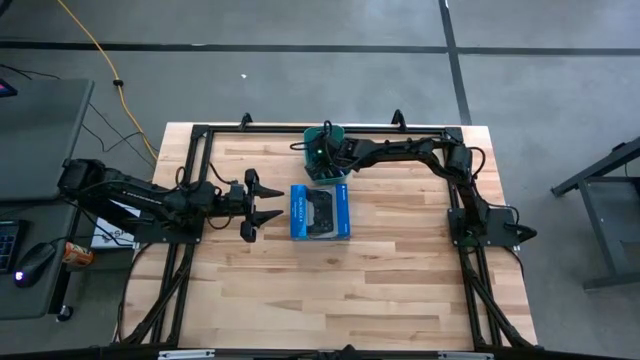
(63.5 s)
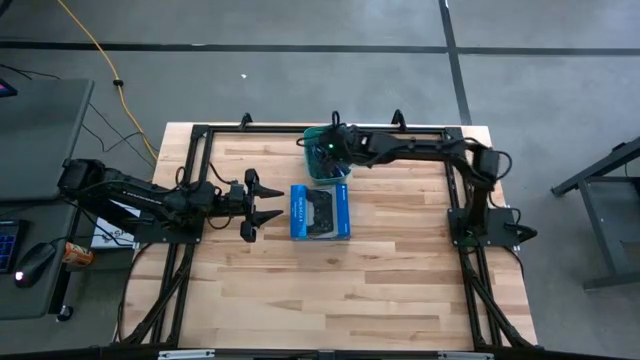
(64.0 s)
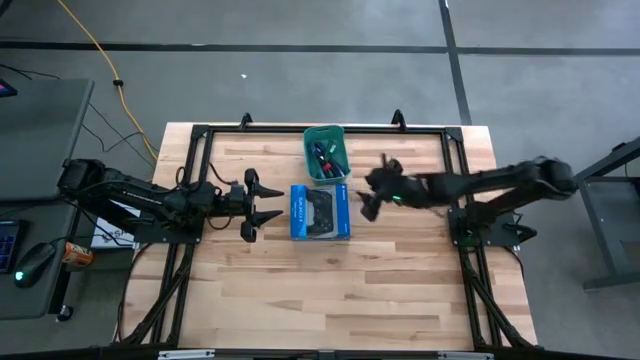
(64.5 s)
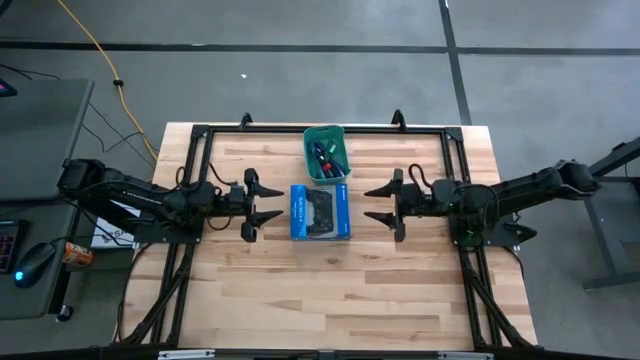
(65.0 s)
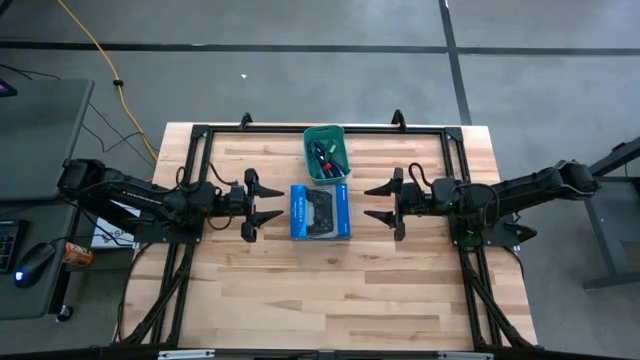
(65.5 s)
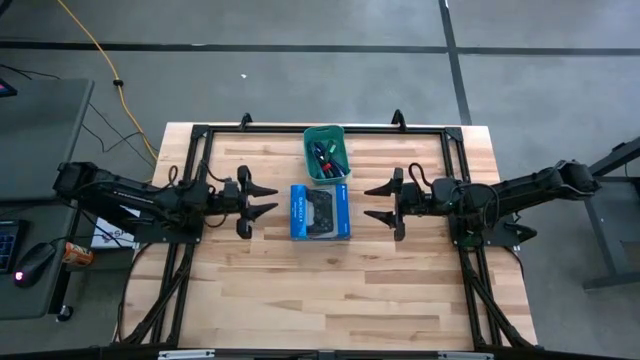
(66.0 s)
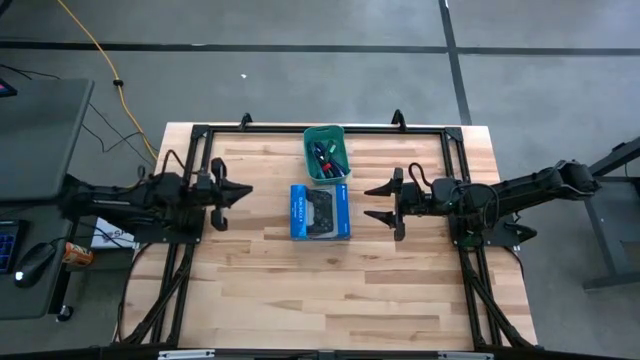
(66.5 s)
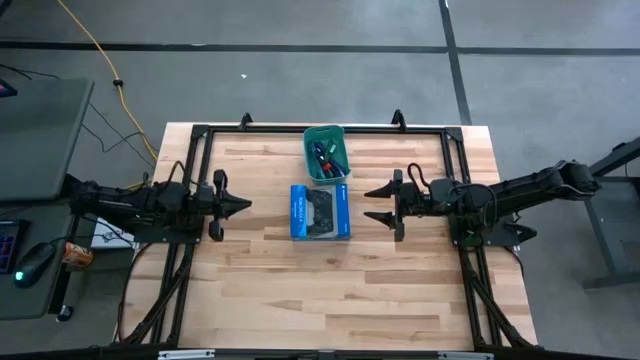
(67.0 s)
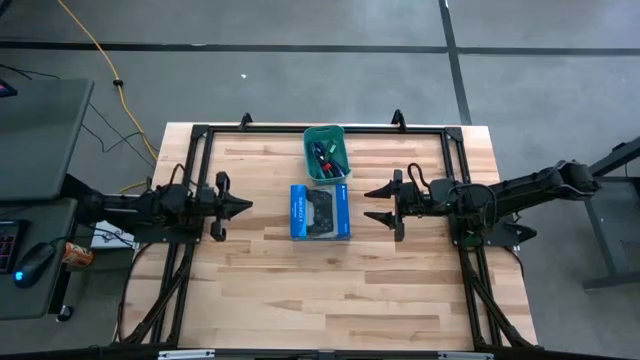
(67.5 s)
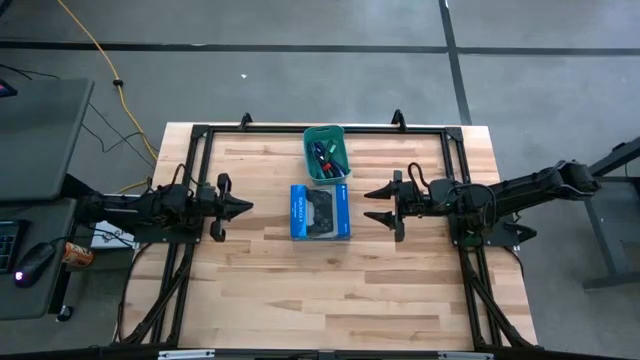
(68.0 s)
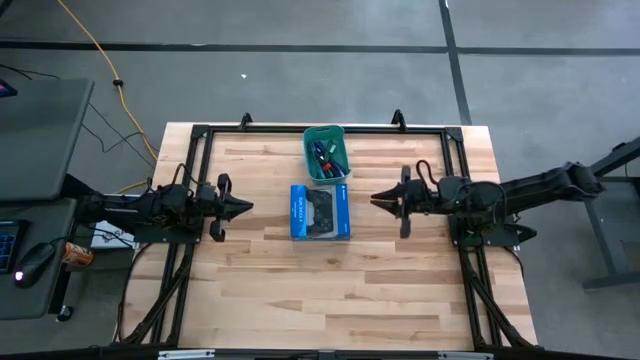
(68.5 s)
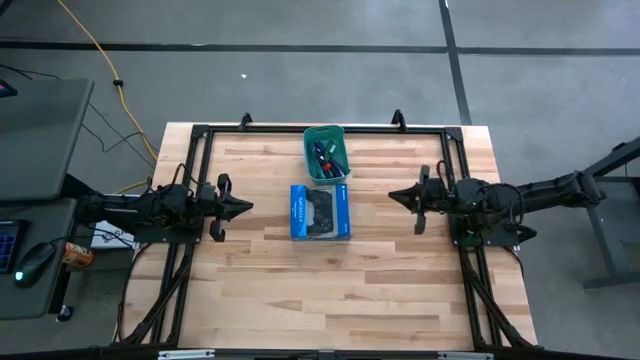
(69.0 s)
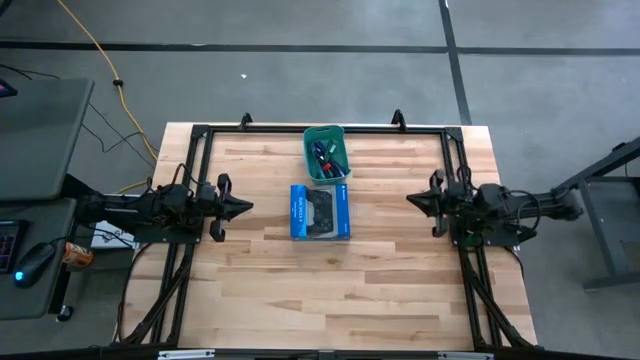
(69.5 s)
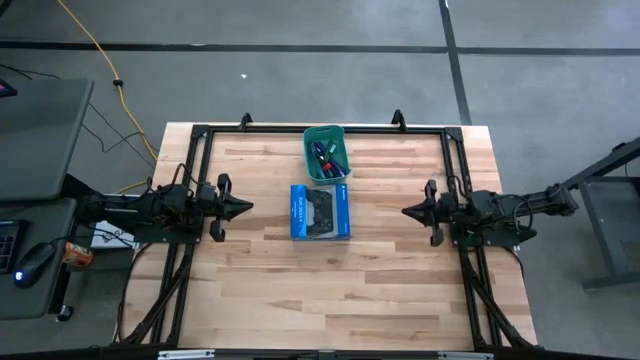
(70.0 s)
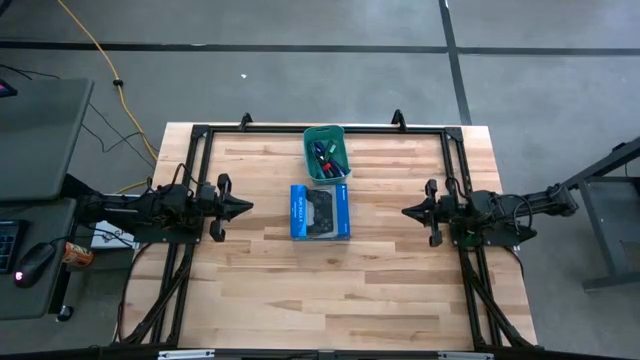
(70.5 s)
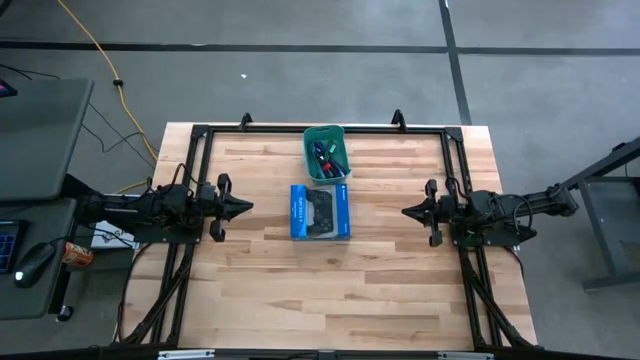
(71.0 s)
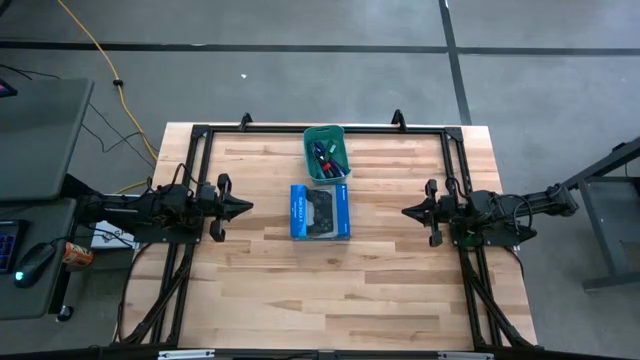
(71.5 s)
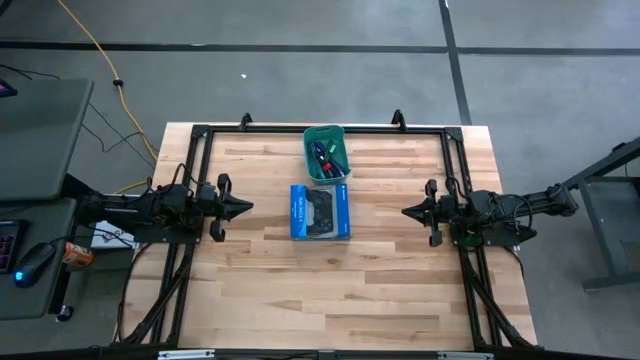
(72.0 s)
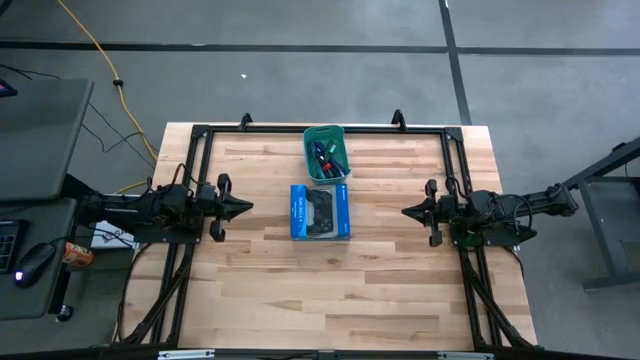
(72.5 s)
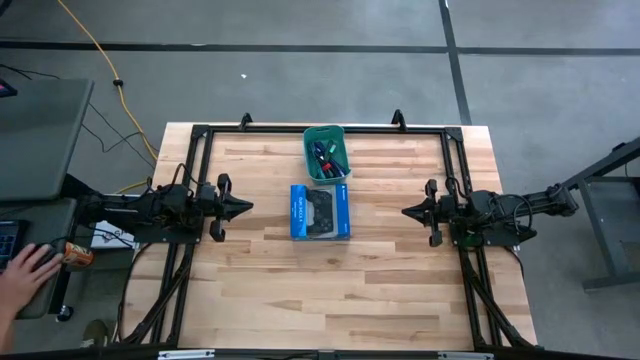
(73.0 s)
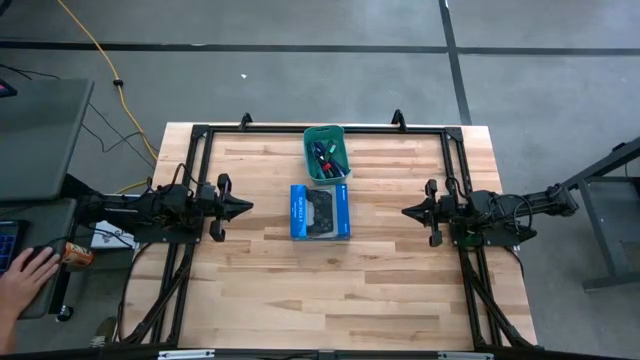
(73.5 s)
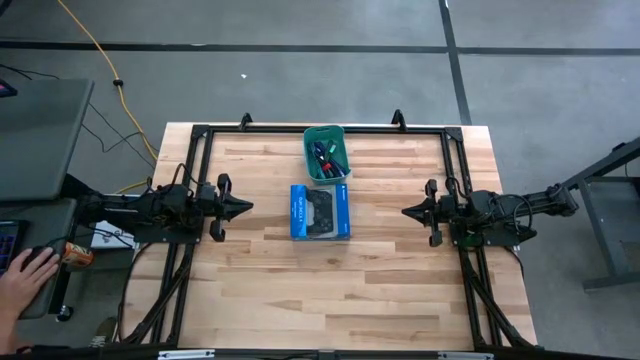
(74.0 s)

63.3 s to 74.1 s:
Task: Pick and place USB-C Cables
Return to Home Position

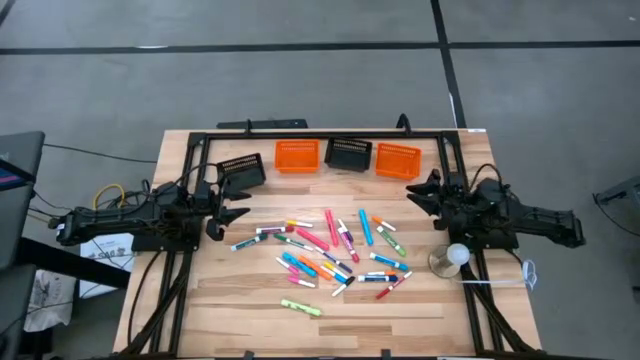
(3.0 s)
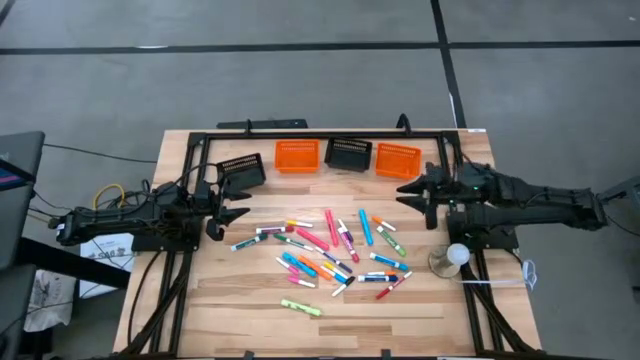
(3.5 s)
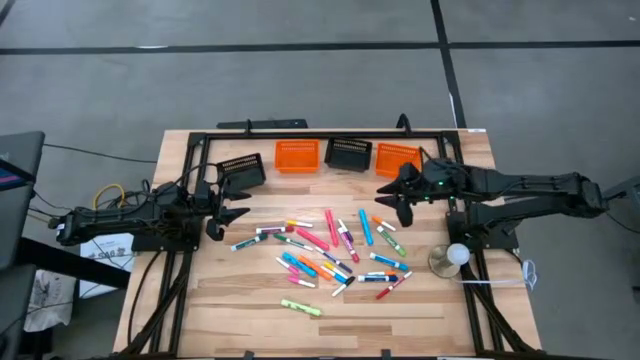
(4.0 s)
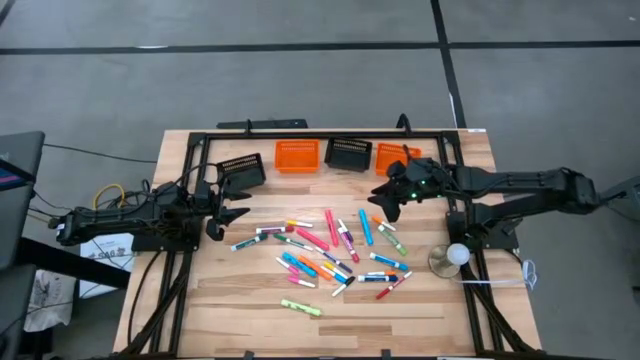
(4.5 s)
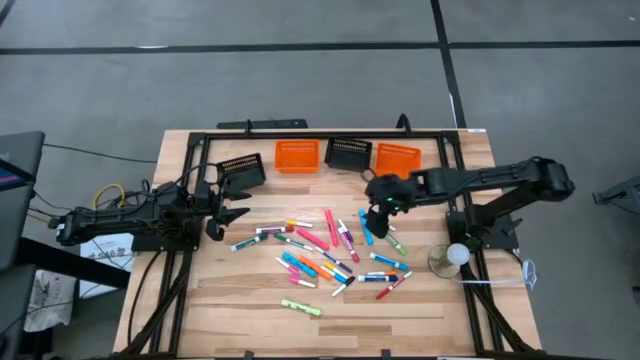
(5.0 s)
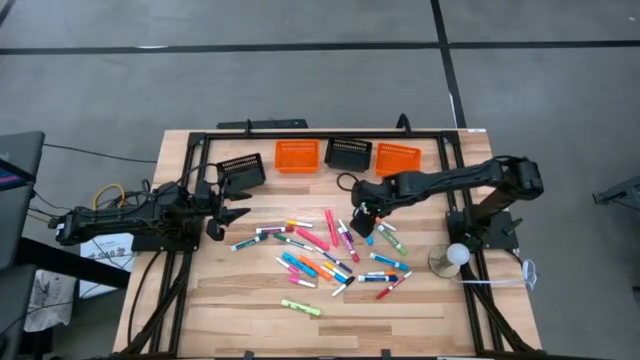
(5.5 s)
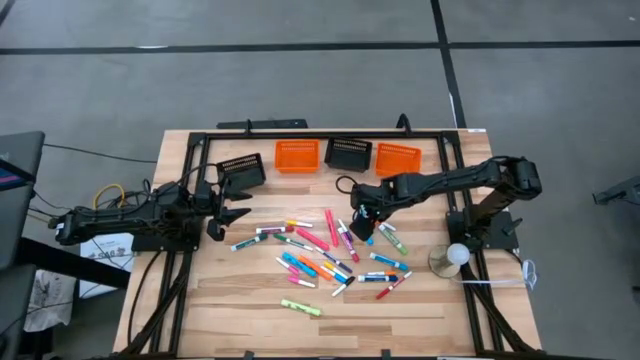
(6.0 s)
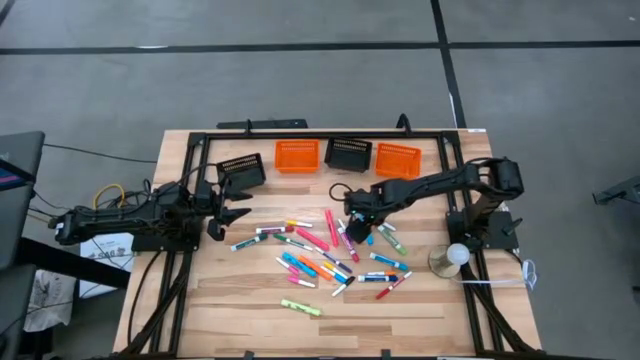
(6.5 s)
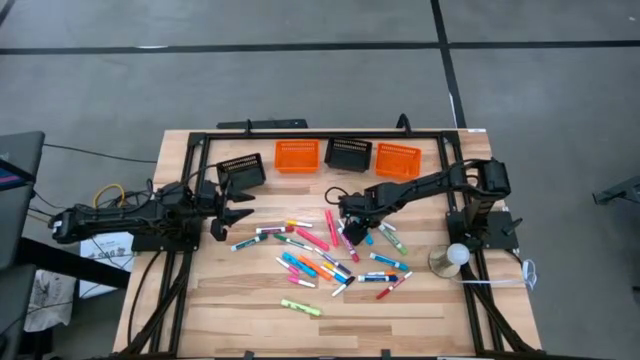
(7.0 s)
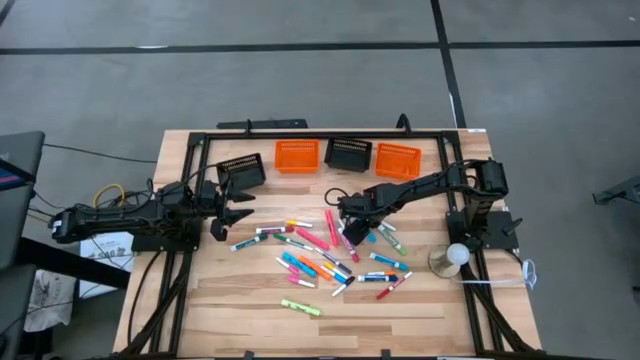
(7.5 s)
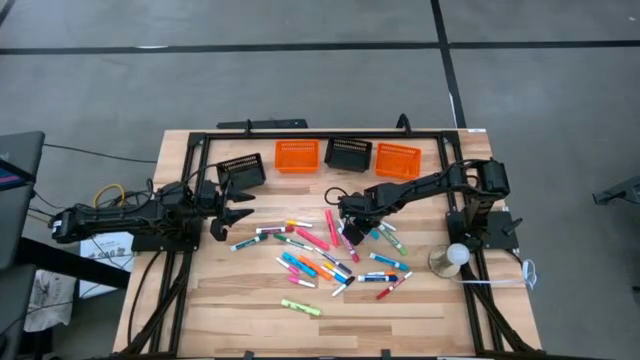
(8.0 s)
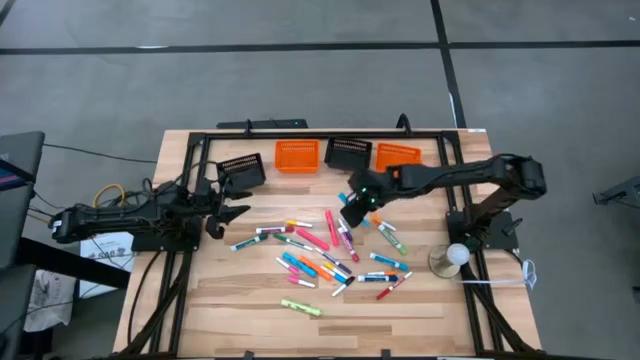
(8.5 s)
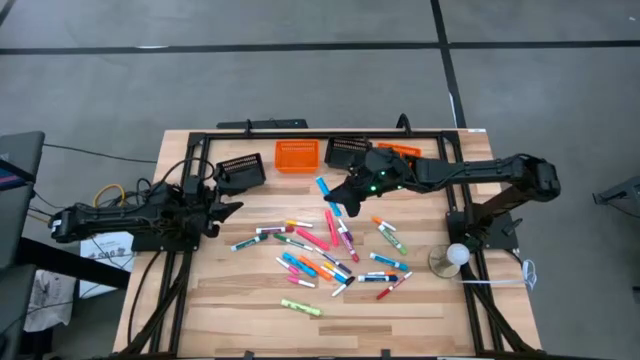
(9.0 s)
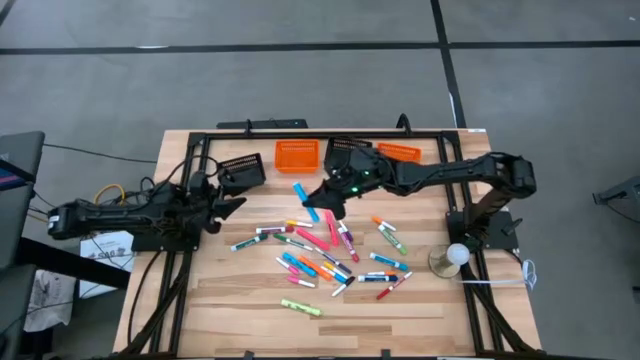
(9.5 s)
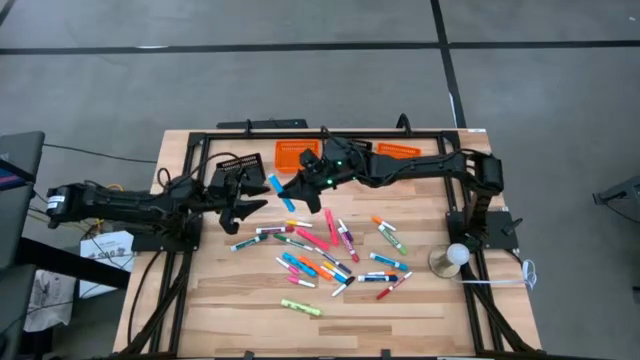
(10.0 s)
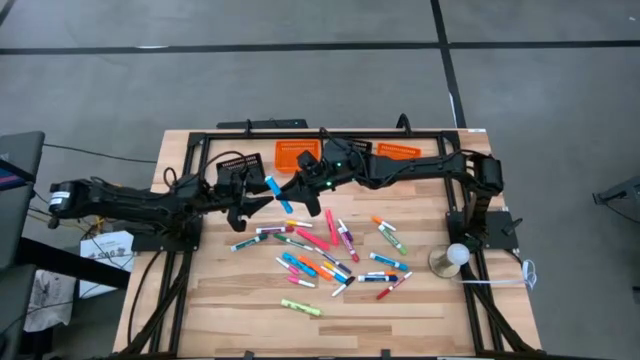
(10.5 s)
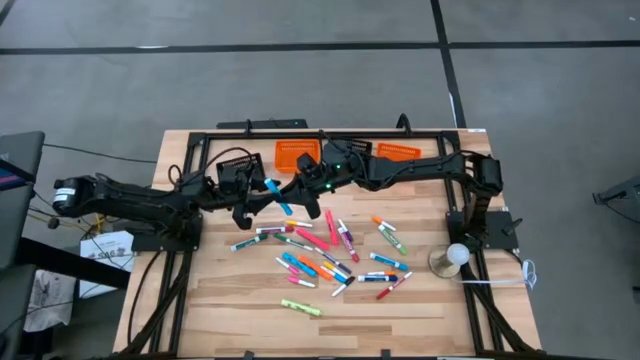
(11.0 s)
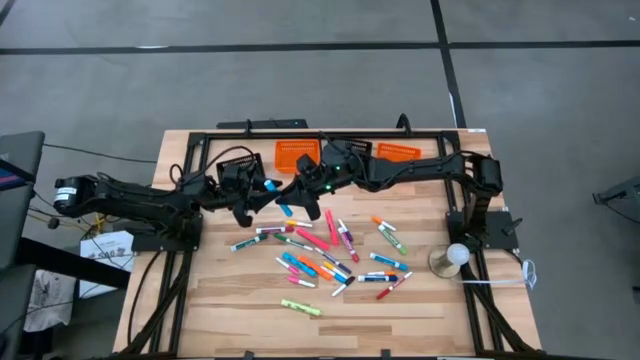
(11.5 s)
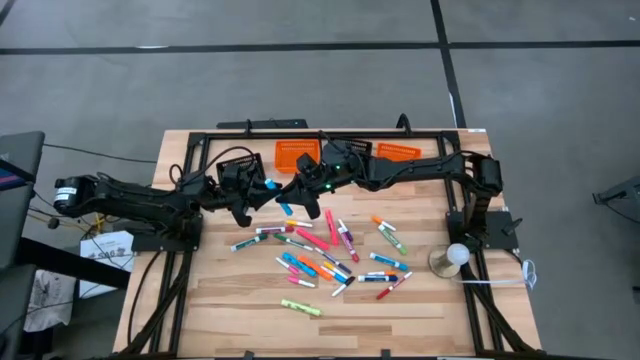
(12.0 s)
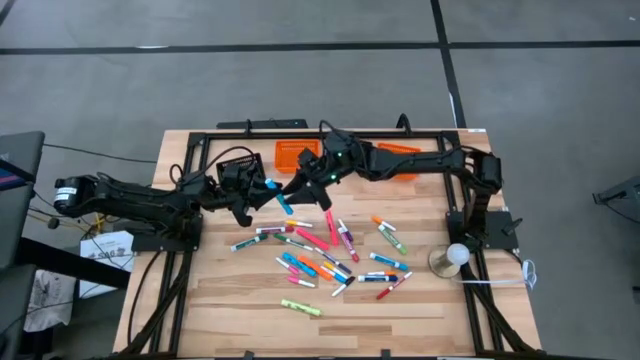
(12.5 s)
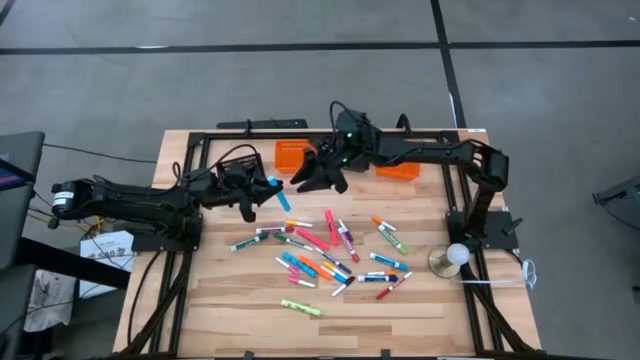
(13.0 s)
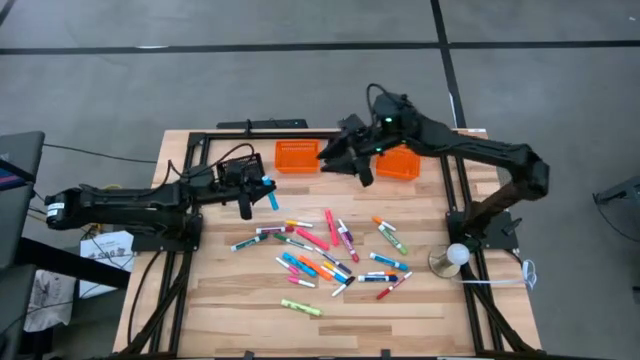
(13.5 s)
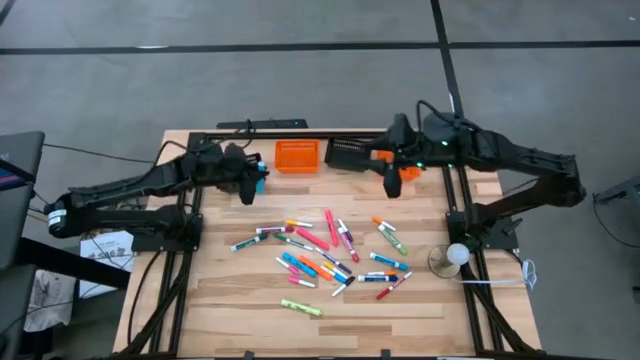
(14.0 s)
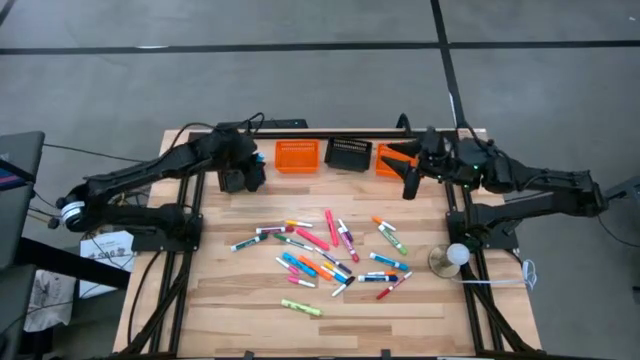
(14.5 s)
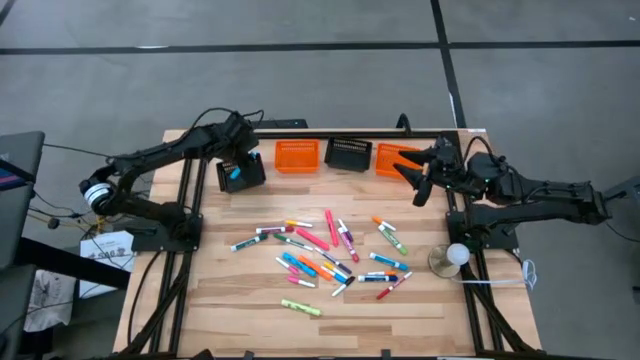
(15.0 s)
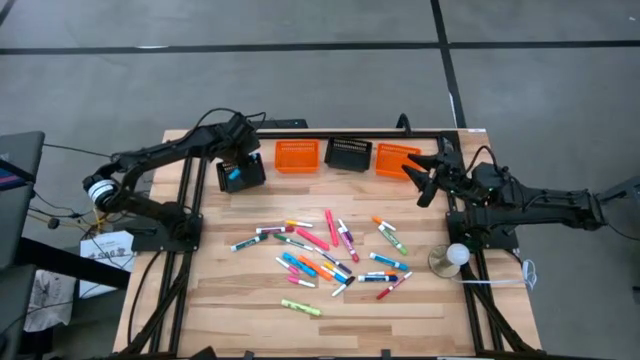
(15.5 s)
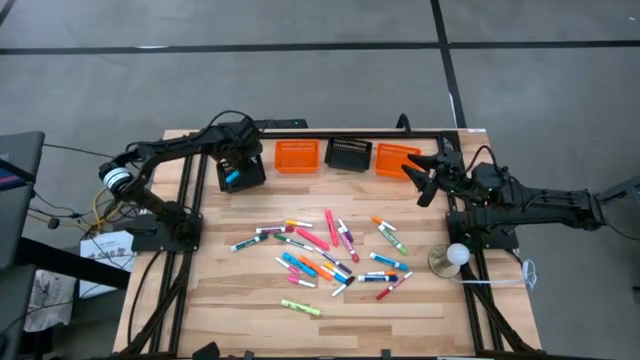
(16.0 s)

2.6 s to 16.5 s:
Task: Pick & Place Markers
Put the large light blue highlighter pen into the left black bin
